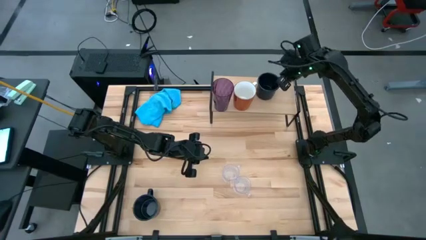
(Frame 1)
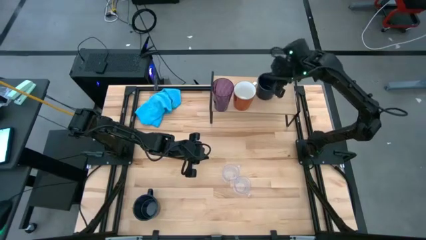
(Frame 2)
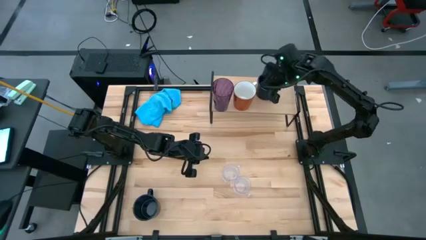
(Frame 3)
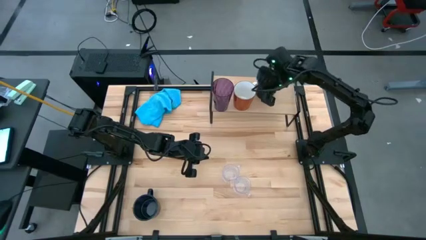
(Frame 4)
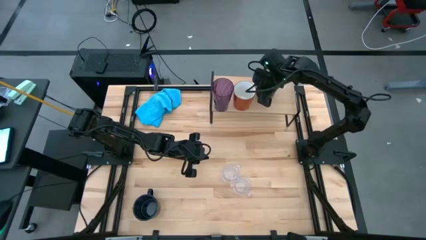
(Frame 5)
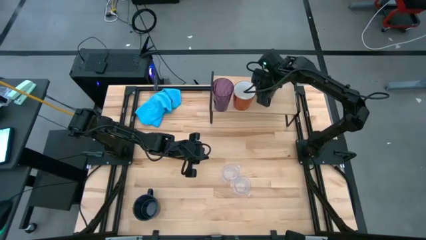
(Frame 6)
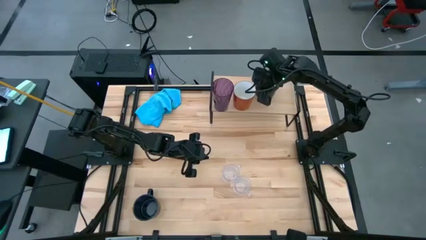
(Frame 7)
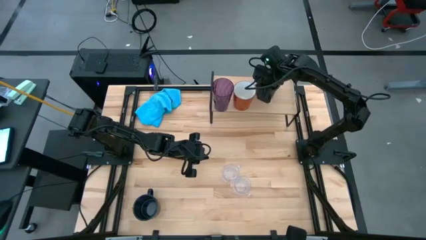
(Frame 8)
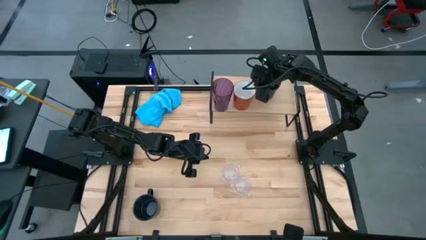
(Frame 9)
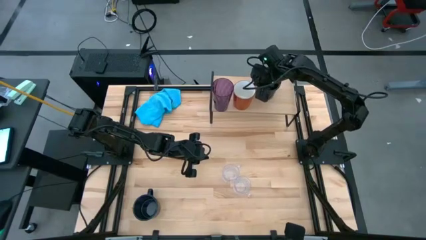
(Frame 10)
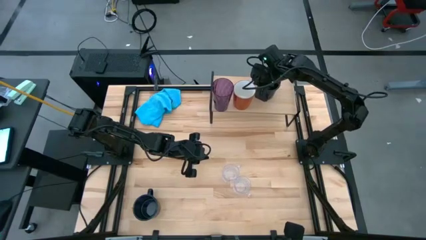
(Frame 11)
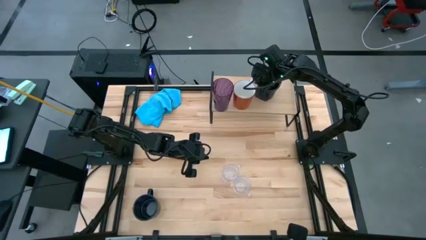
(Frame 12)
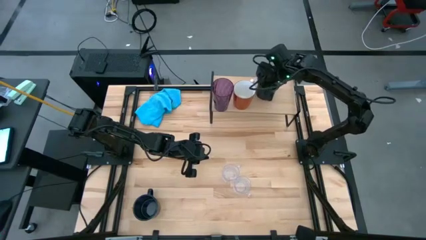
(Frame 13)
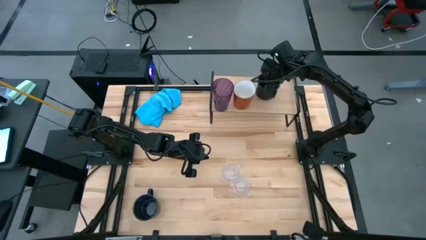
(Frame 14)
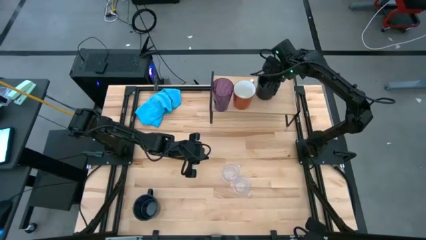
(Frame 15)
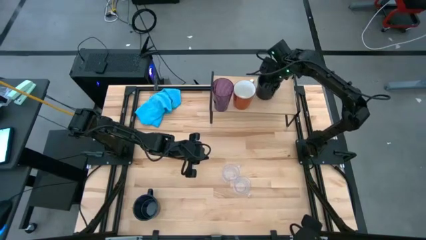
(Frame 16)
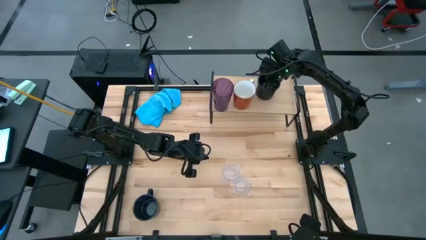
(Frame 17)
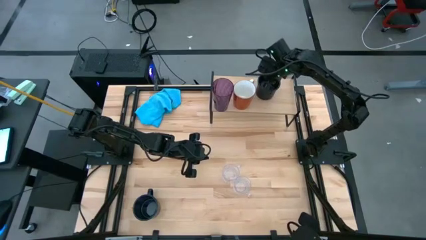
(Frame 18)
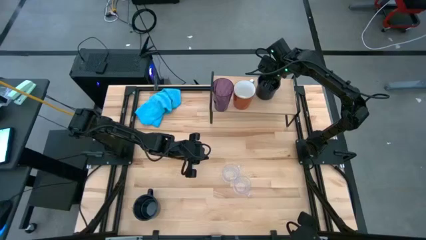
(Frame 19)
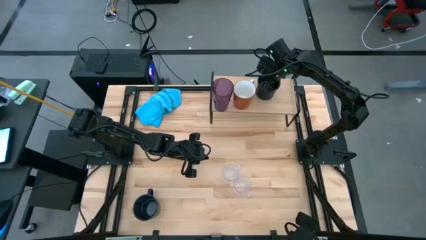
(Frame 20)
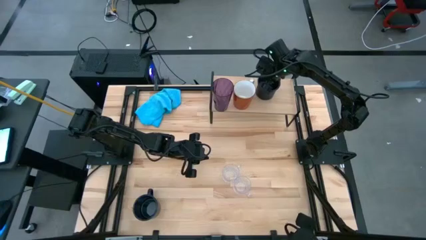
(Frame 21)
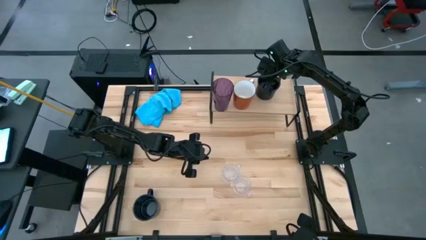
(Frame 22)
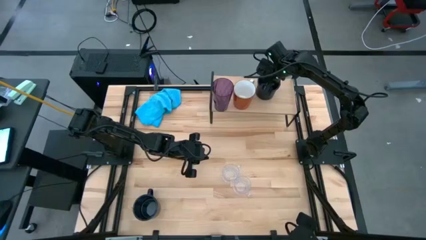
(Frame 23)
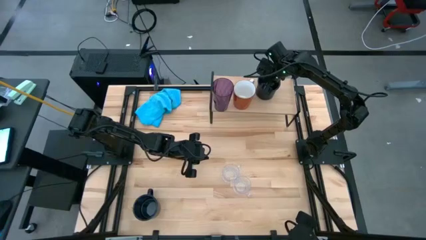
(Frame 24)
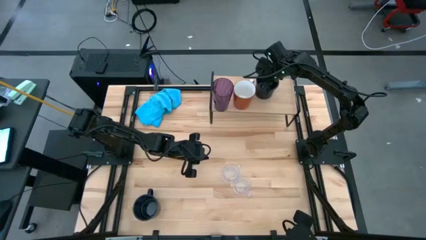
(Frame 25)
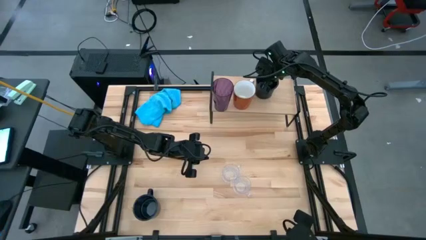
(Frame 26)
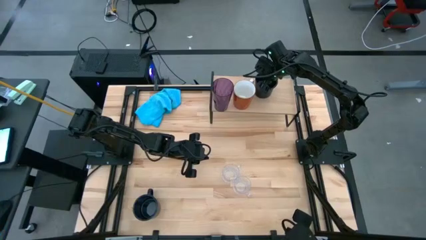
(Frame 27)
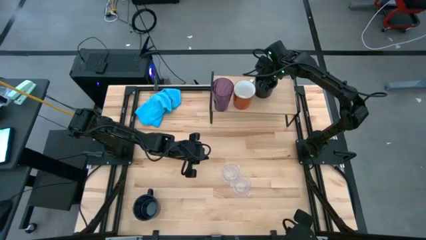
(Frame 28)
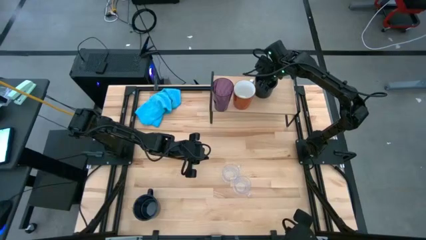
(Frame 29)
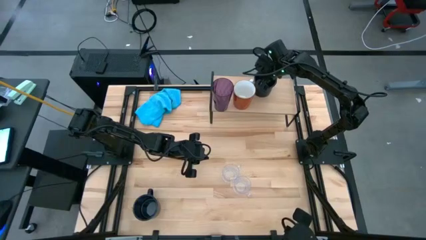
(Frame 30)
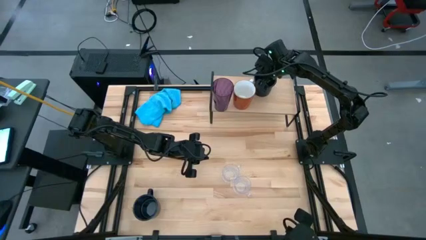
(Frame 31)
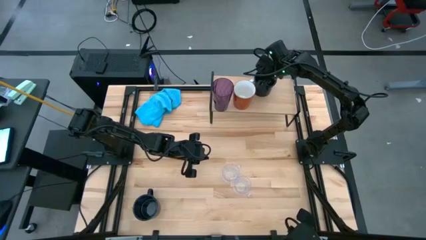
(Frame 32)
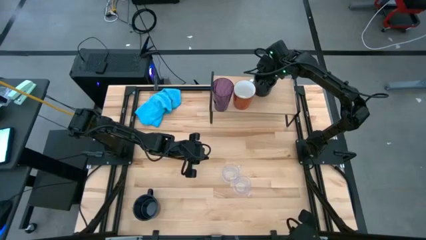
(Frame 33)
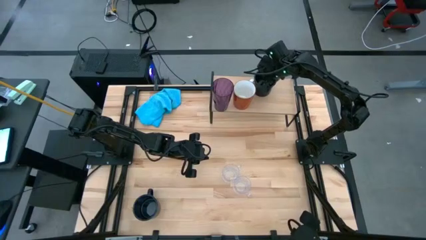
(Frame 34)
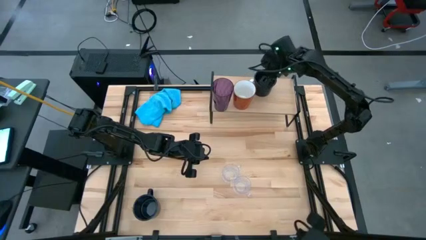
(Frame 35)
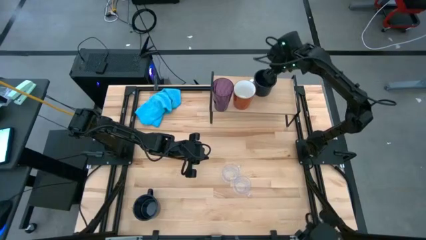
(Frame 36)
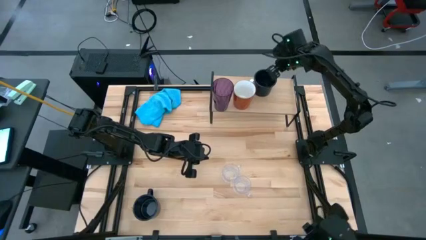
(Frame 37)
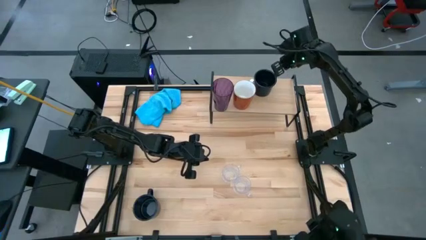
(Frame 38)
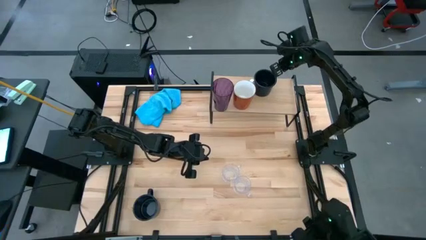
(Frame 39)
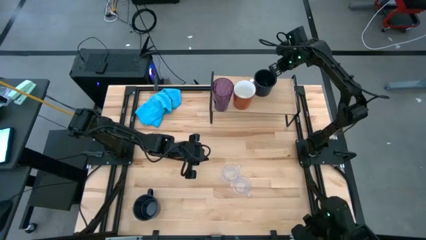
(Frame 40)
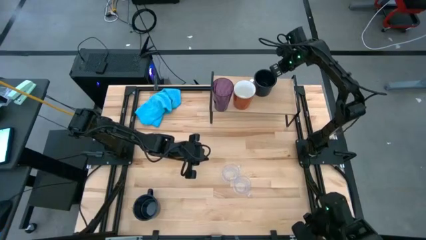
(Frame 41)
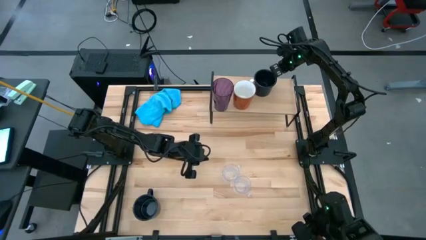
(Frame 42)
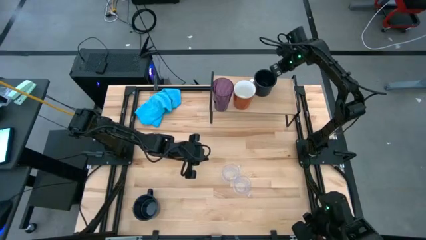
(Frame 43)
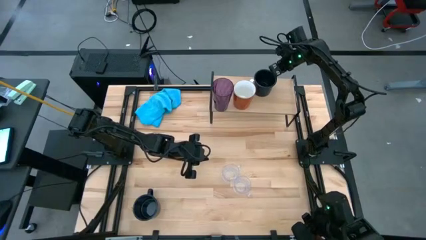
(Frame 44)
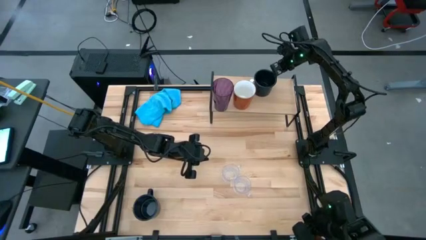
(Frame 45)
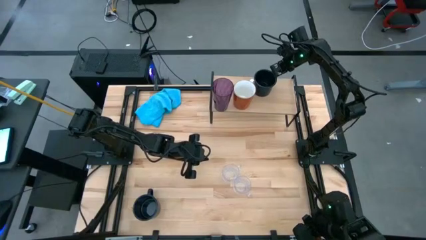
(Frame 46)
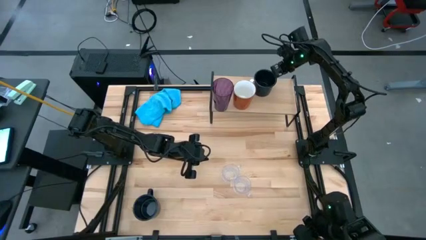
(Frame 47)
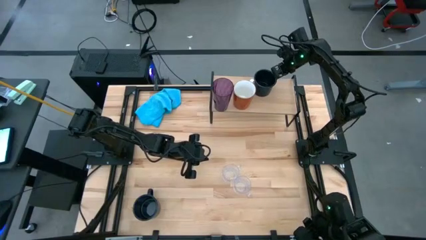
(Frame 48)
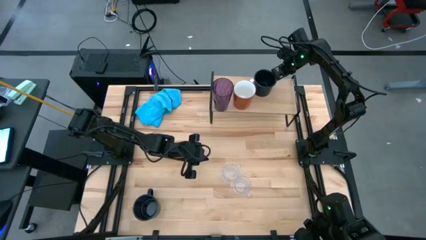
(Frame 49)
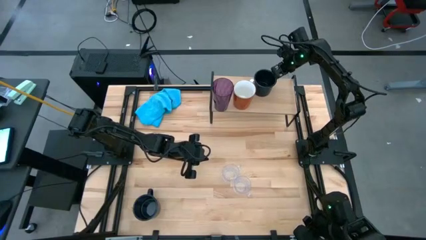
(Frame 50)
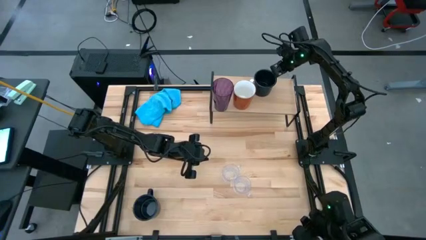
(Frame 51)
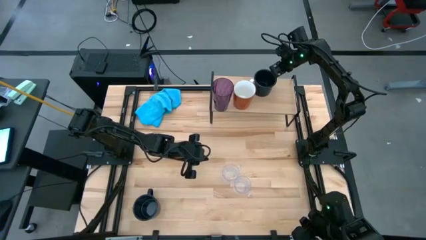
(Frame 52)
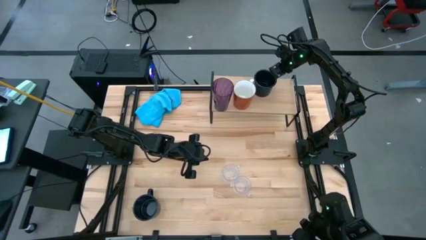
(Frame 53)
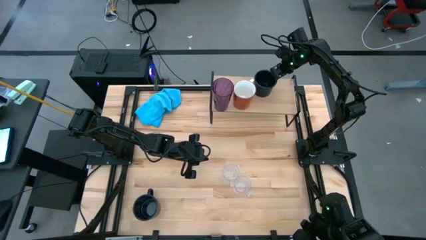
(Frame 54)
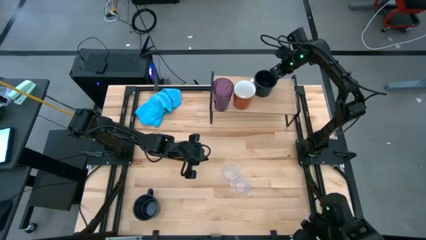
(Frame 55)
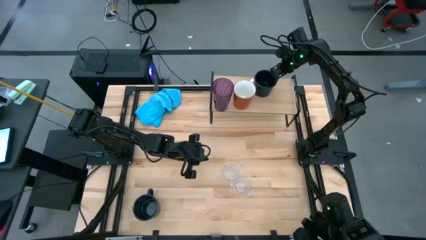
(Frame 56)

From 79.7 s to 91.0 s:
Task: Stack small to large cups/mugs on shelf
Adjust the mugs on the shelf
